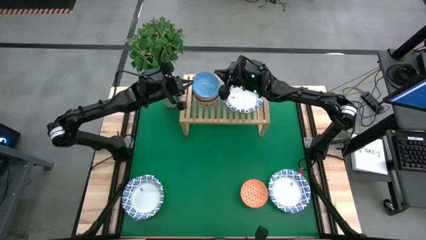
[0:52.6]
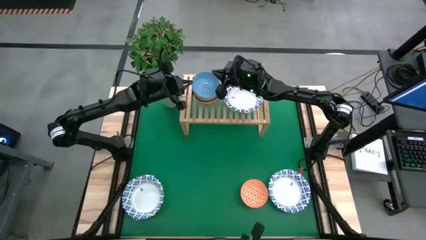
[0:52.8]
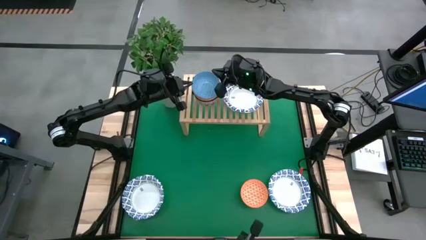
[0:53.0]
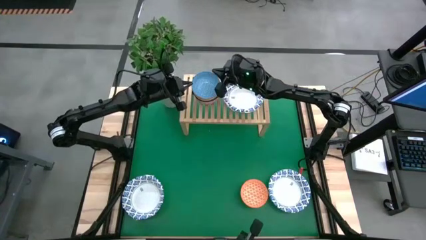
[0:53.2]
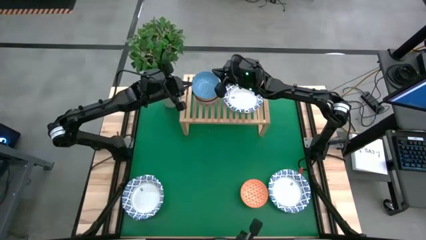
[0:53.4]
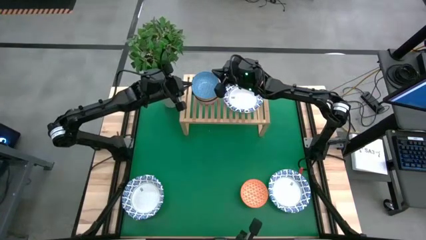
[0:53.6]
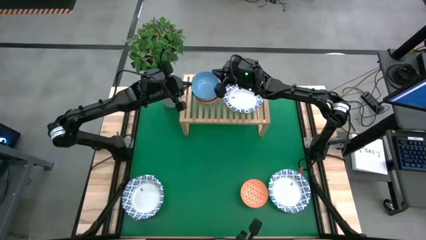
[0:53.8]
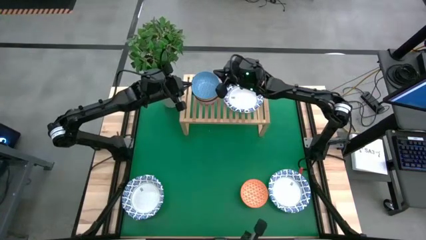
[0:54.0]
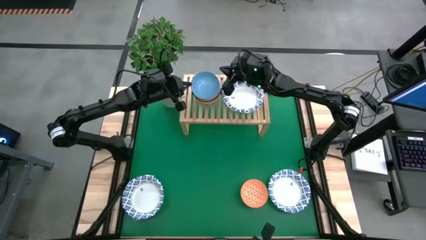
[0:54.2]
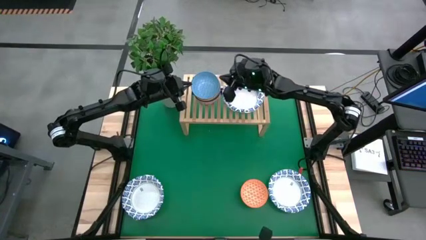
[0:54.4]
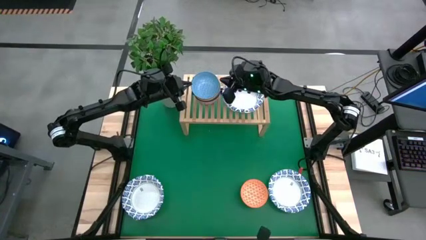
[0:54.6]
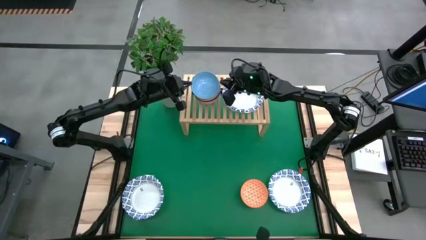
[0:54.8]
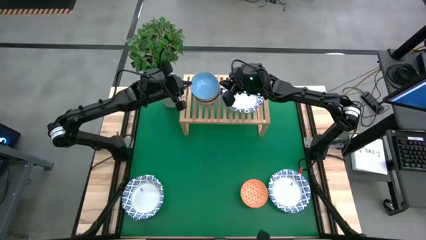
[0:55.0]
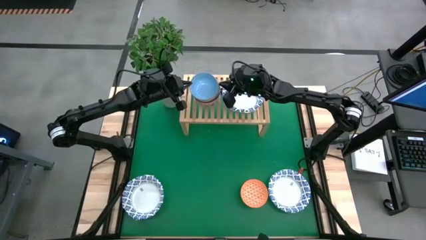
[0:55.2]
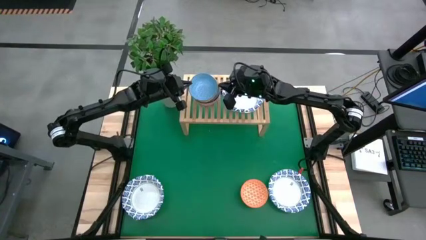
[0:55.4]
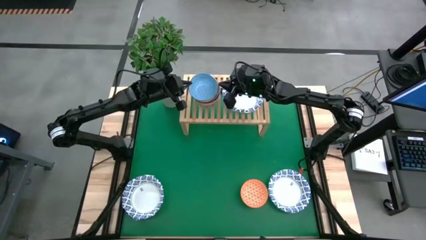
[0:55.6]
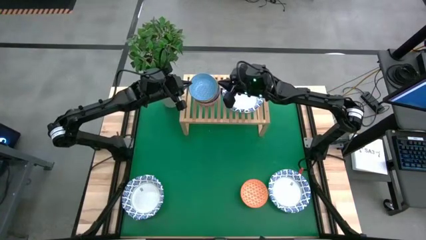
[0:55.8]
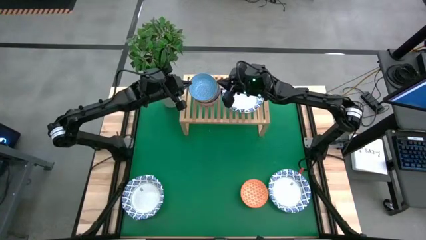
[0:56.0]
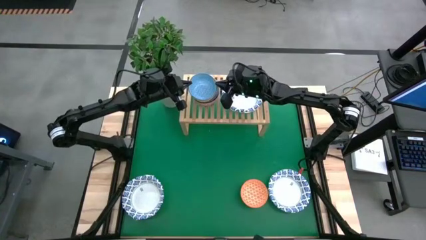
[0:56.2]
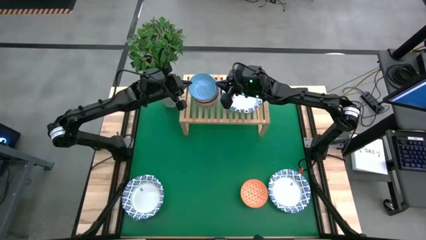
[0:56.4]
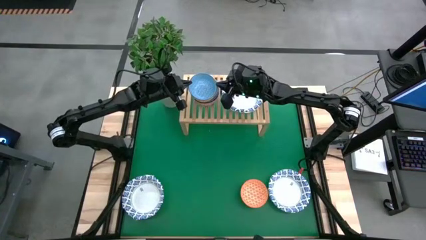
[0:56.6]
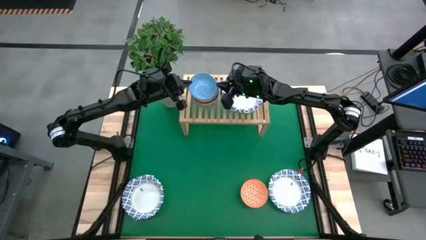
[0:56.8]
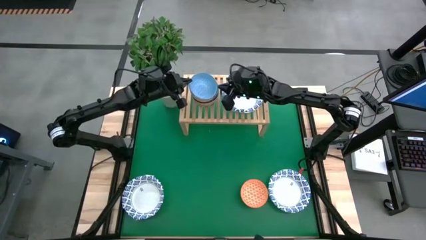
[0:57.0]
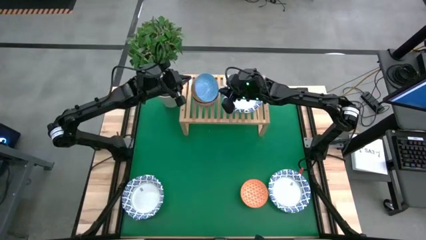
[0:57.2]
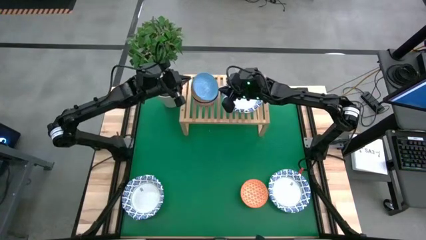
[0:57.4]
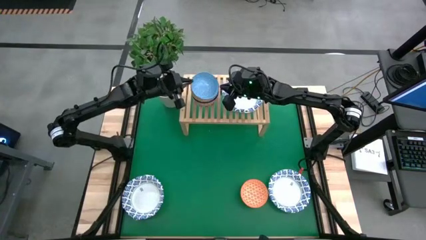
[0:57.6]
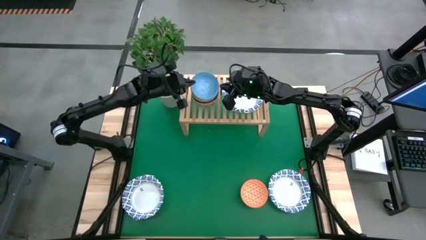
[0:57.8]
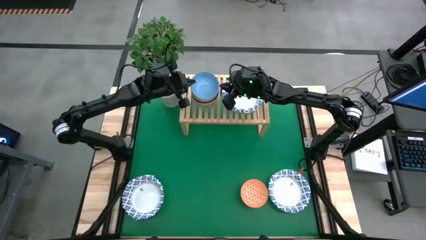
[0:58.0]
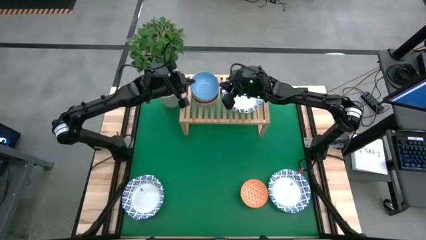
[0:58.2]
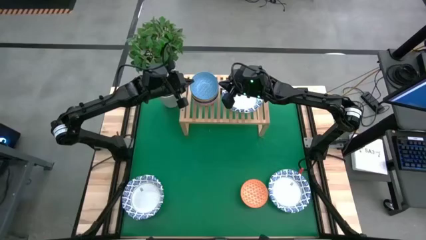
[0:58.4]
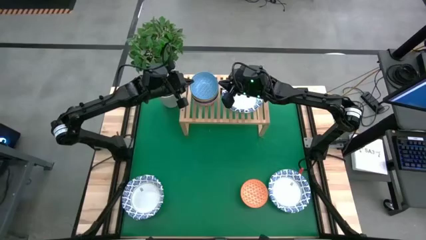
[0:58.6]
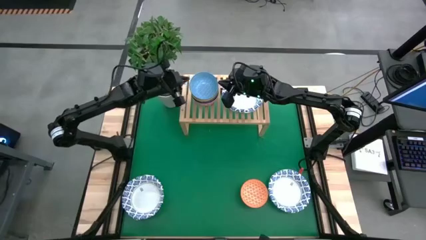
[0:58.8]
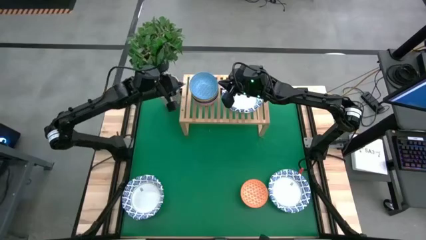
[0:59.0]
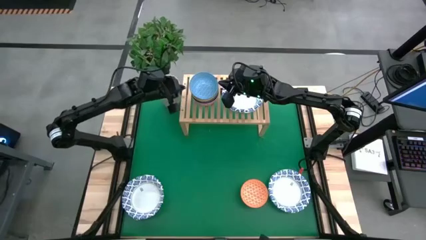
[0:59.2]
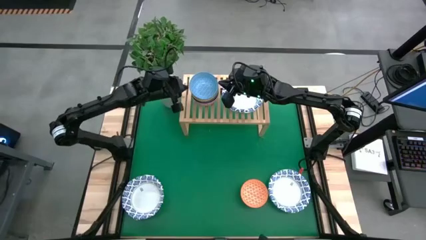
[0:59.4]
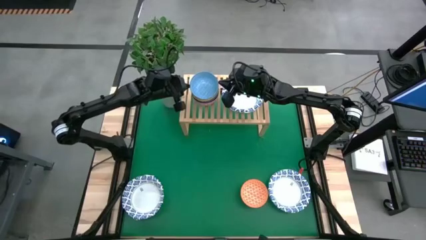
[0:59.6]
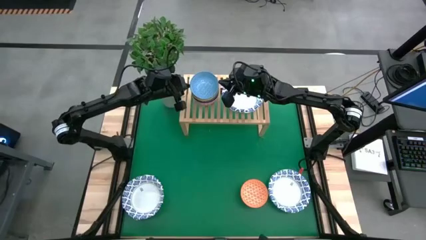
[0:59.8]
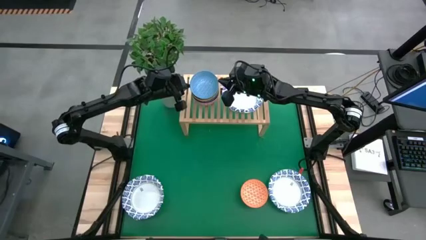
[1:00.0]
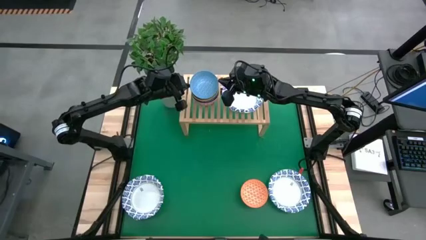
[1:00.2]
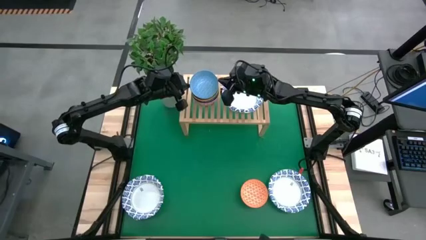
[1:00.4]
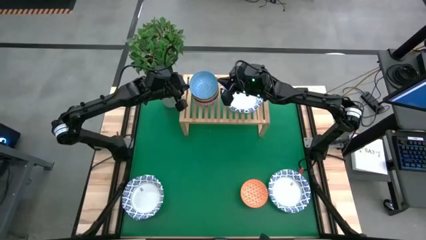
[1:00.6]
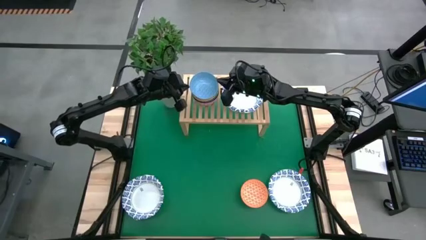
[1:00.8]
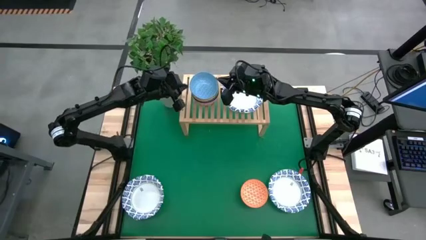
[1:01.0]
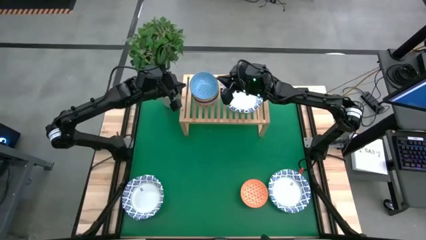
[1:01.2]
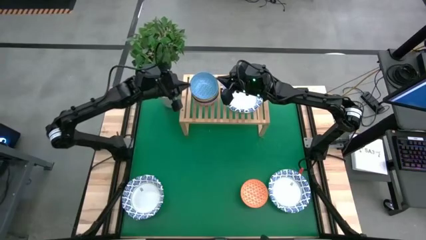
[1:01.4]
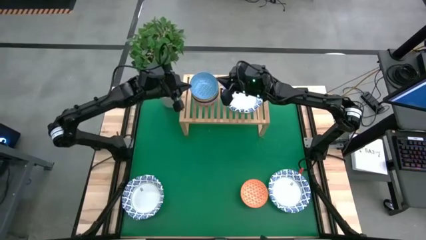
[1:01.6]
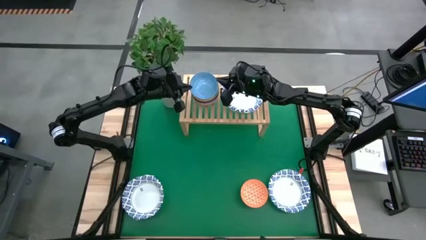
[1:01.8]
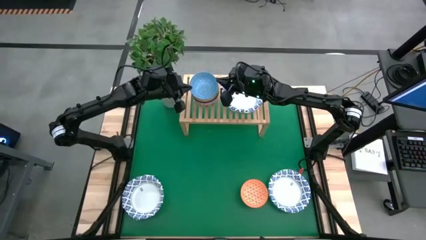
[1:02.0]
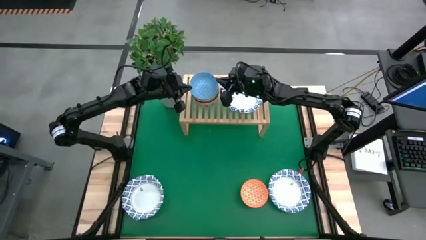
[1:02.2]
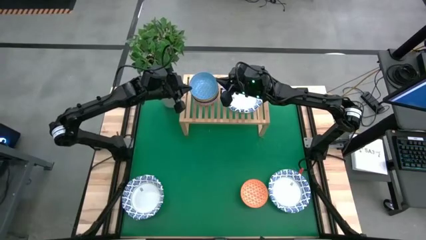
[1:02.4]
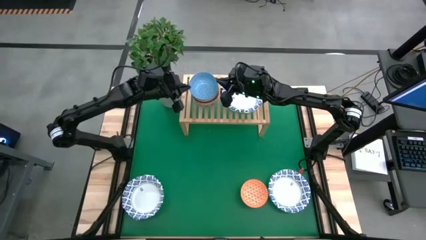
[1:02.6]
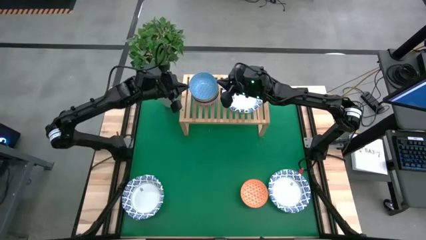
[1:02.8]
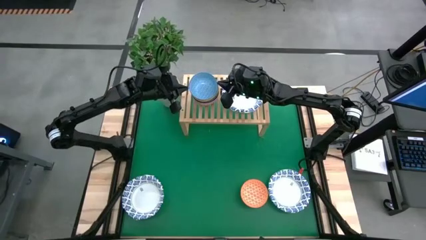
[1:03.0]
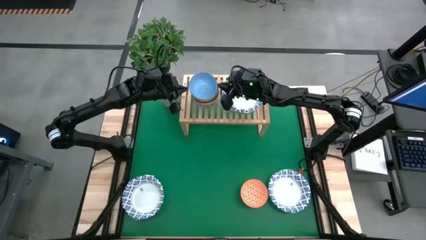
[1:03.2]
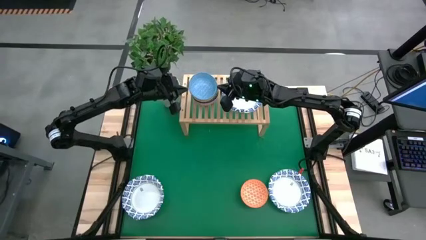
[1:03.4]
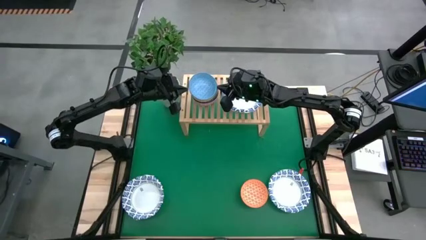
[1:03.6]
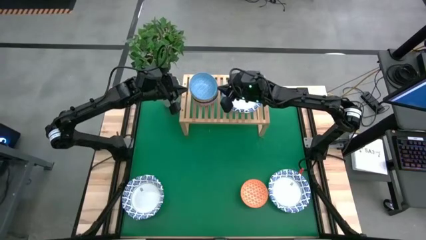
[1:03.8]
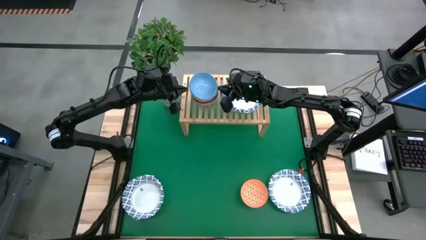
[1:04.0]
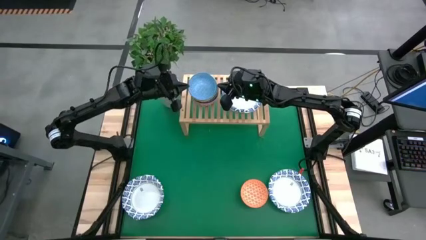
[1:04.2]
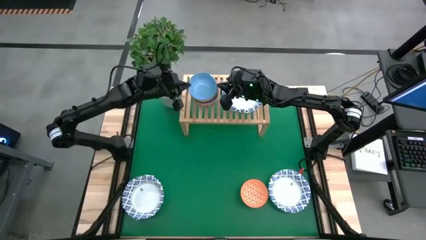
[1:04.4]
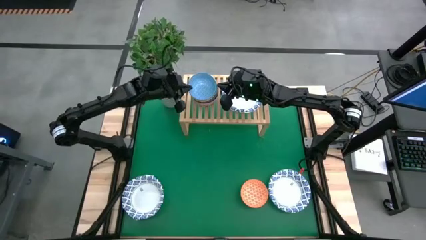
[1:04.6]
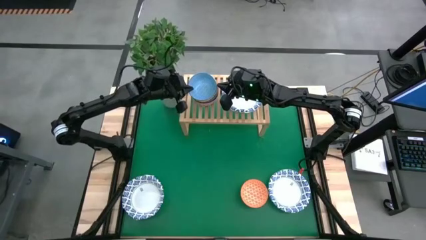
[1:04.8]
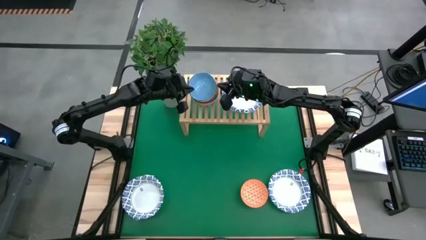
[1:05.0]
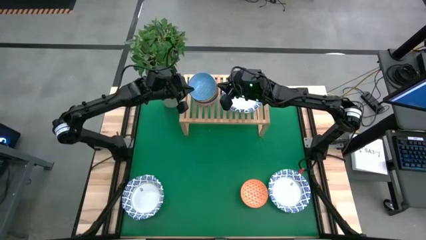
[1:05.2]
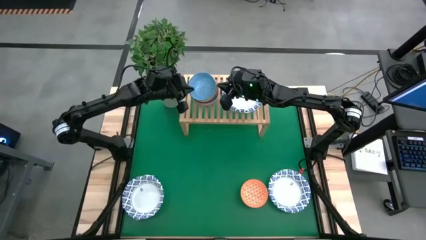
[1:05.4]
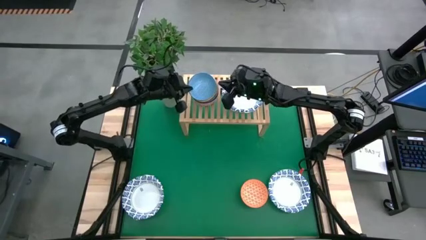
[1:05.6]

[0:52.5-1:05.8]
Task: Place and stack bowls onto a shelf
Stack the light blue bowl on top of the yellow bowl on the shelf

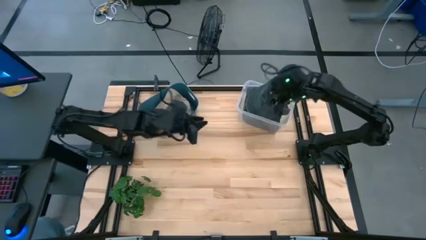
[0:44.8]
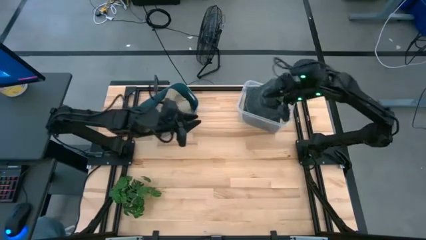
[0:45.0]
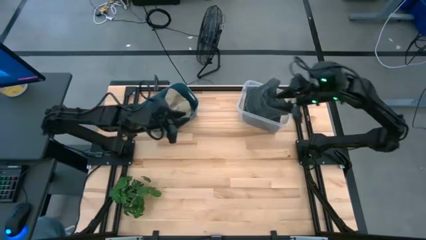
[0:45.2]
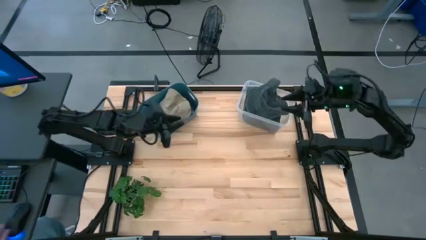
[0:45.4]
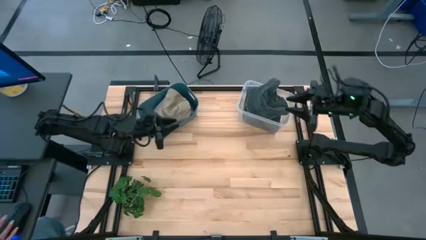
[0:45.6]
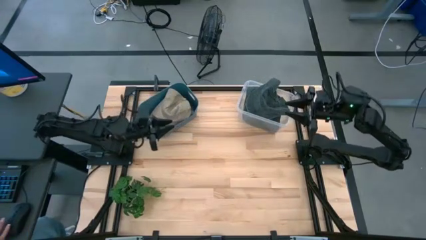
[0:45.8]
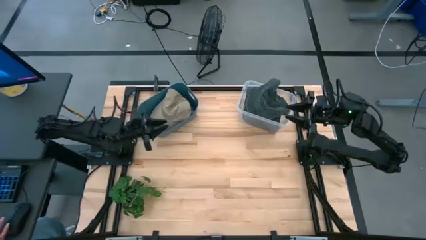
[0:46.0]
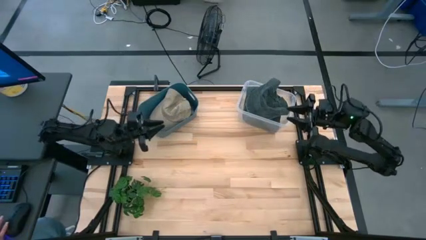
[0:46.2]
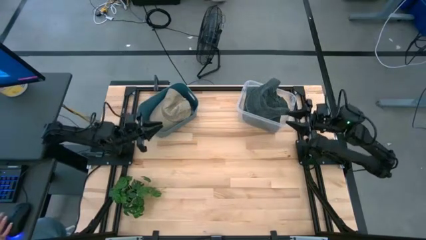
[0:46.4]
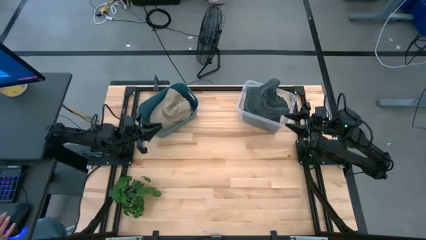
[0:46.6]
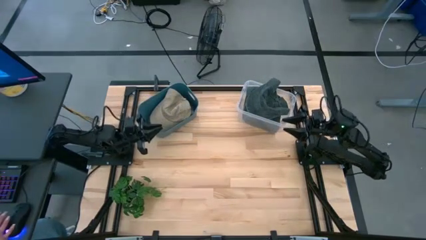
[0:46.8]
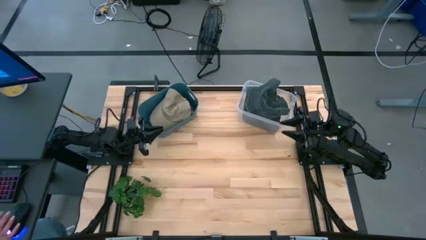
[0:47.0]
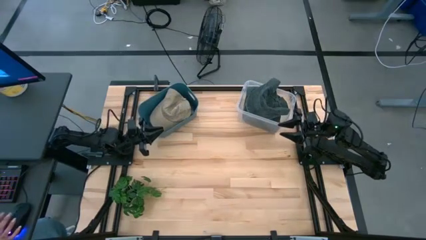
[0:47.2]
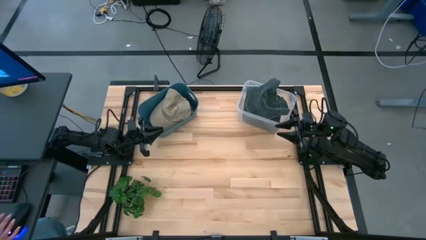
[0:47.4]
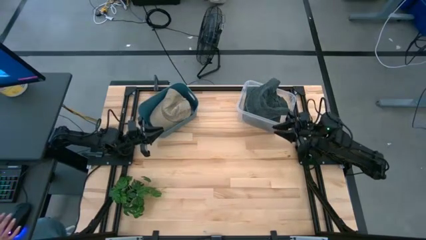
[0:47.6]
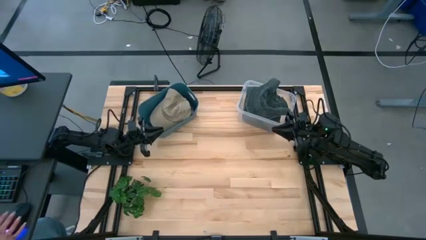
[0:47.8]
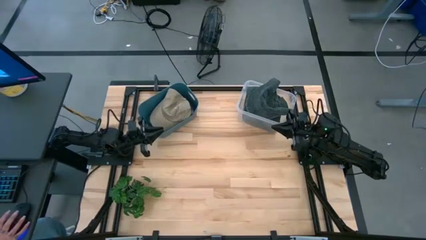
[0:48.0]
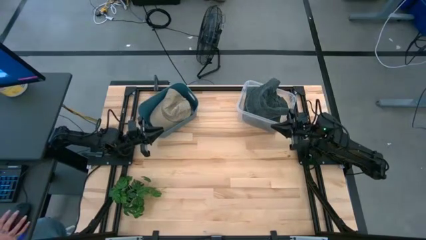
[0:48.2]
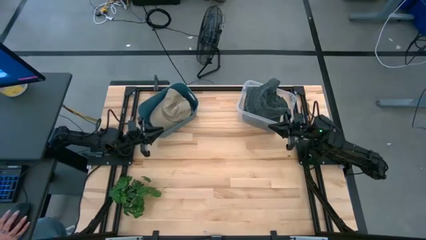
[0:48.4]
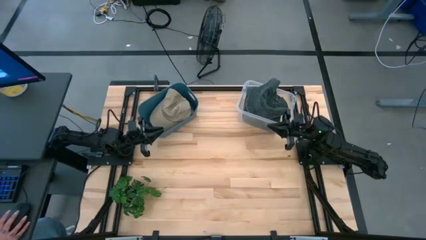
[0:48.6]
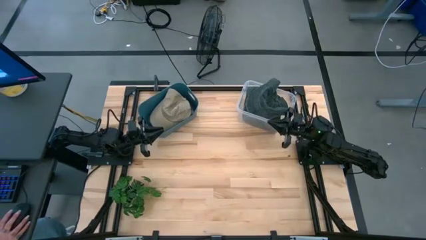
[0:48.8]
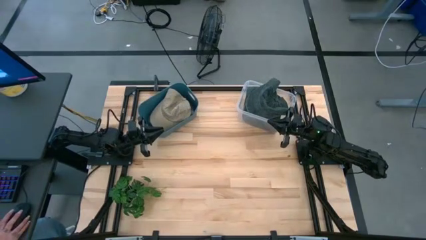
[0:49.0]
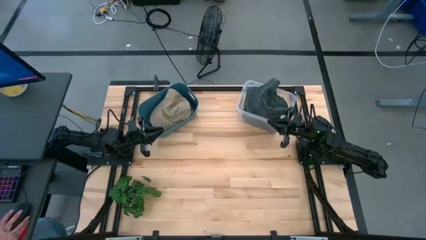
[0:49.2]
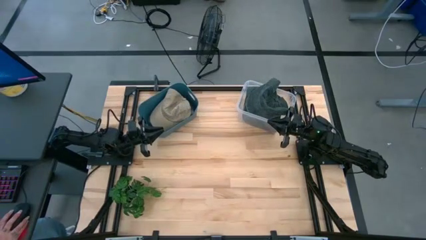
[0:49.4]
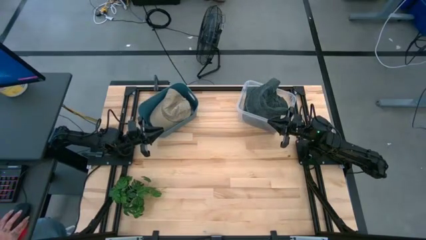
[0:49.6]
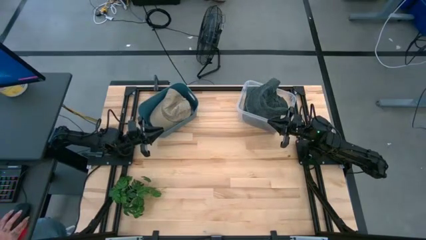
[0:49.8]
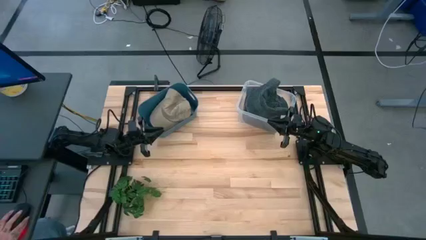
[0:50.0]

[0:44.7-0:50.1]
Task: Pick & Place hat
Return to Home Position
